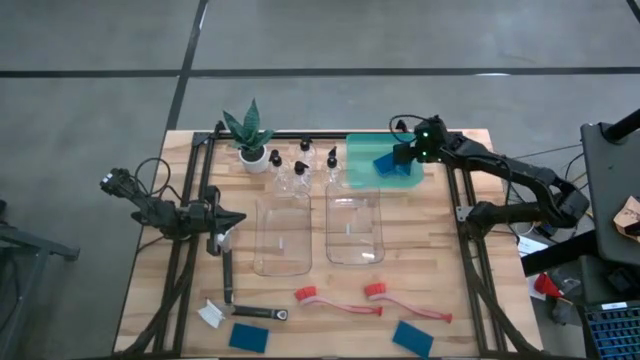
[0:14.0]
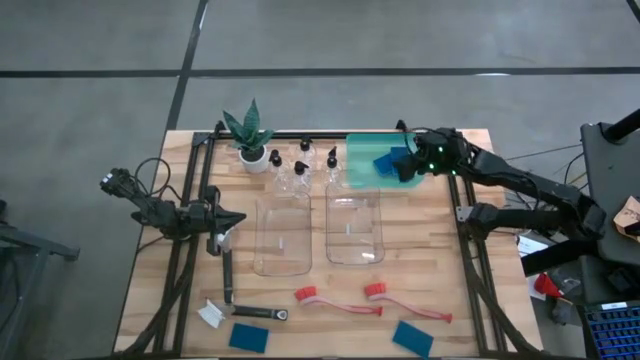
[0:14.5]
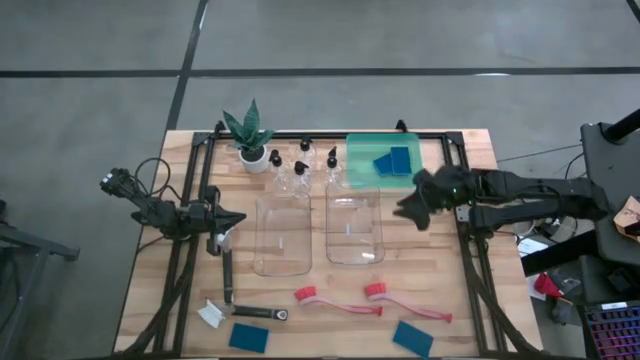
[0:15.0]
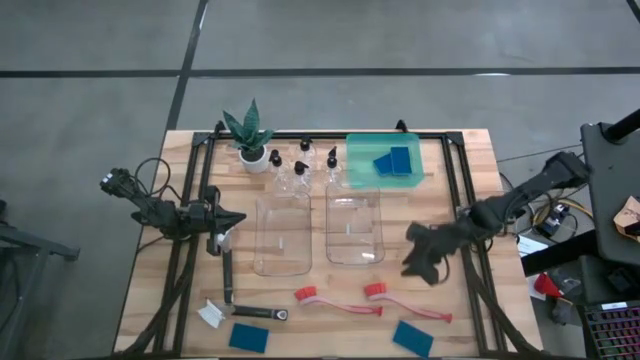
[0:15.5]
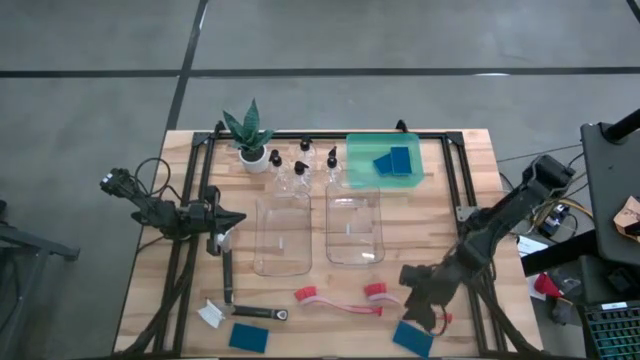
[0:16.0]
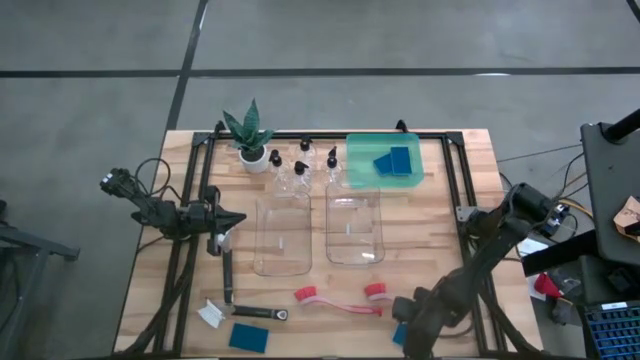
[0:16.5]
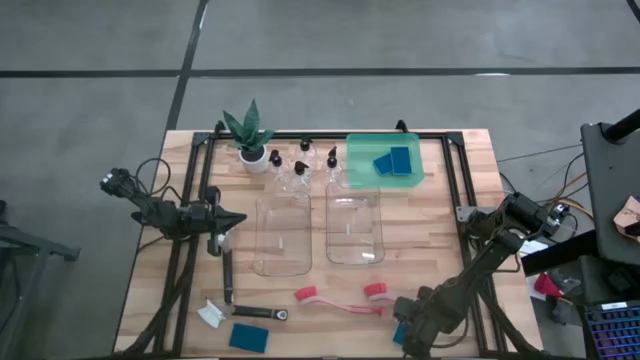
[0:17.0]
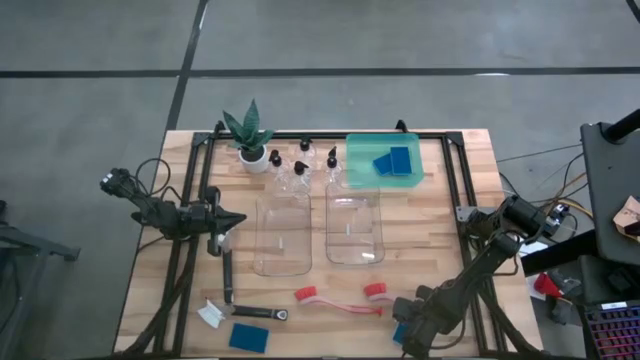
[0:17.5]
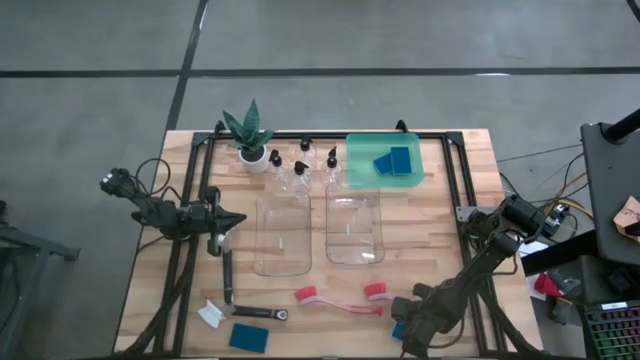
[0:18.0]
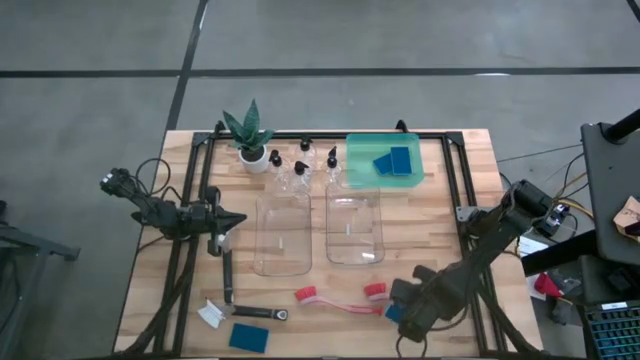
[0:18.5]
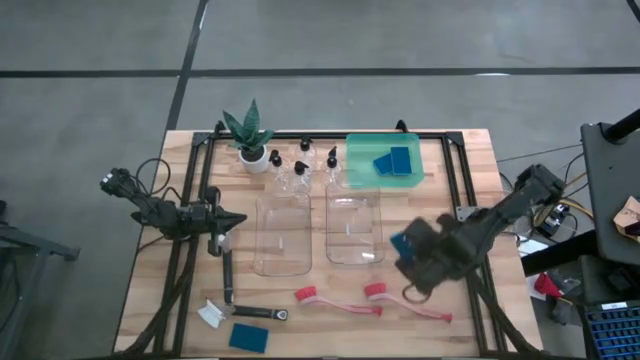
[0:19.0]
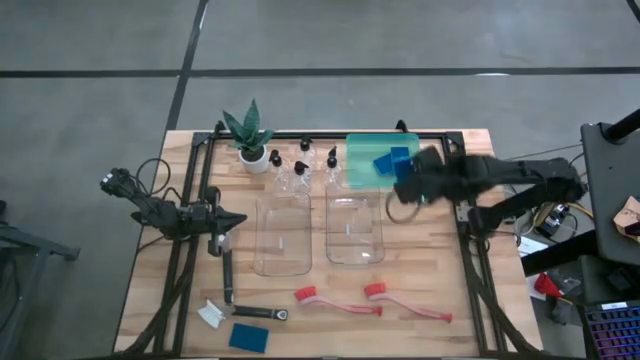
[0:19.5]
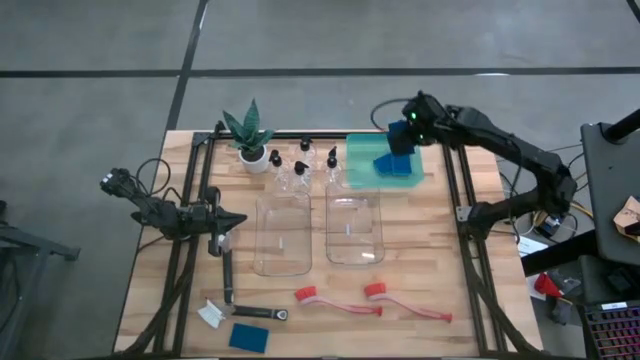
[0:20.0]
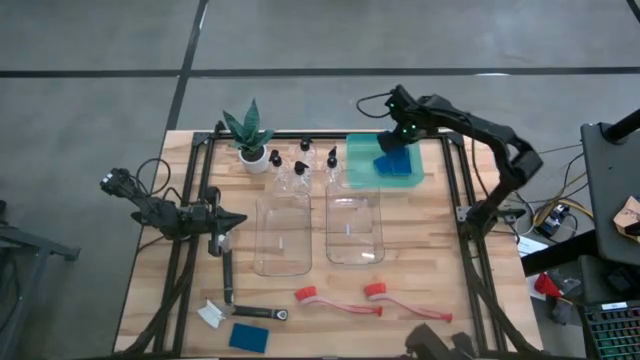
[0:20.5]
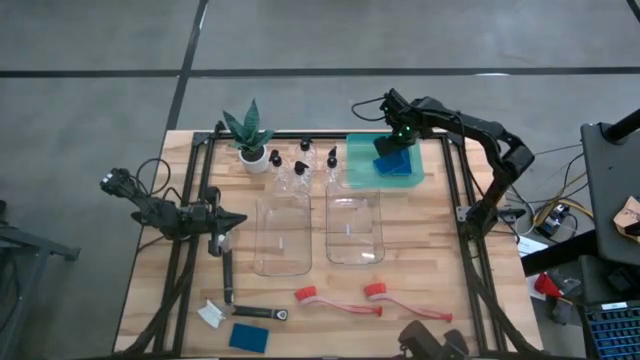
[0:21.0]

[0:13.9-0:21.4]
Task: Pick & Place Kitchen Sink Supplies
Put the blue sponge into the green bin

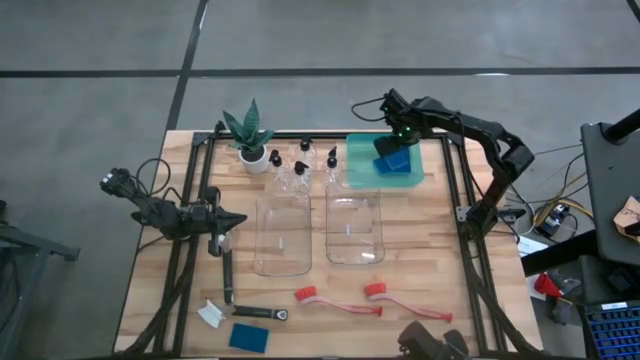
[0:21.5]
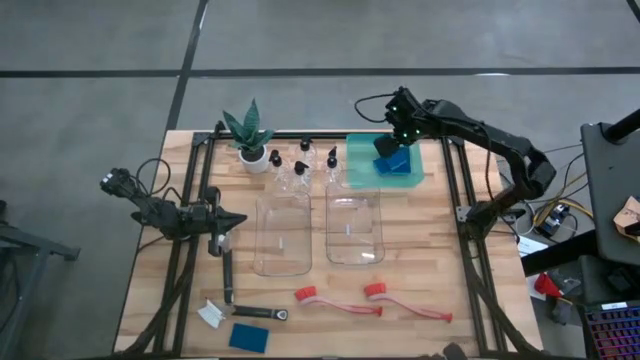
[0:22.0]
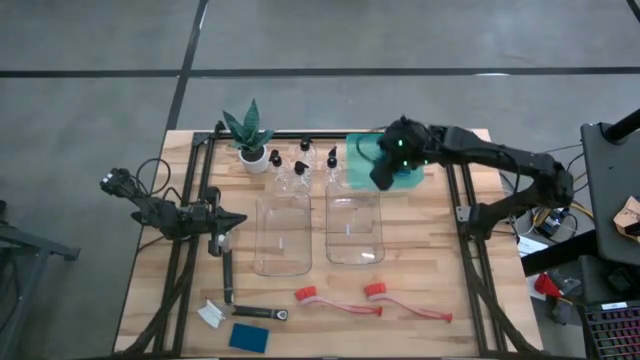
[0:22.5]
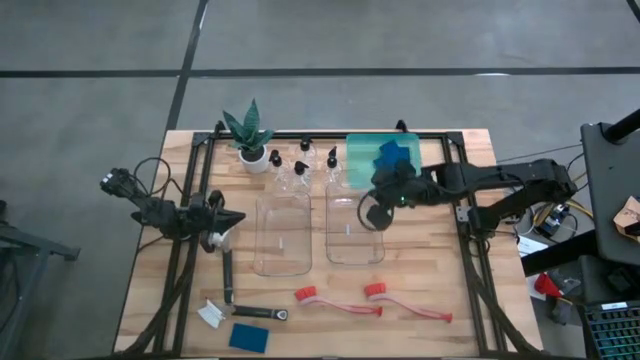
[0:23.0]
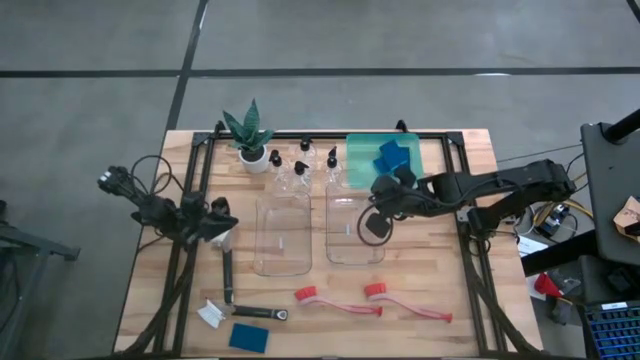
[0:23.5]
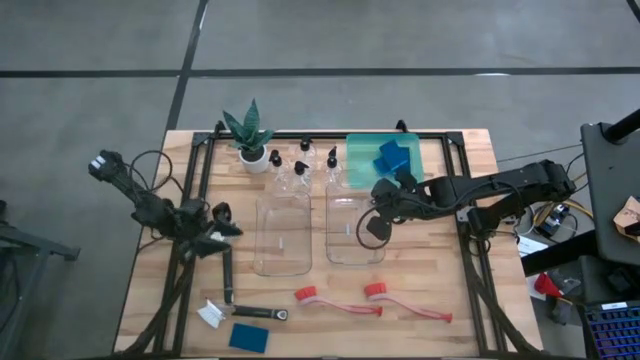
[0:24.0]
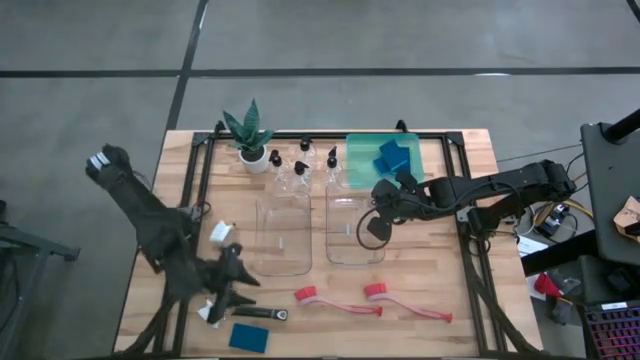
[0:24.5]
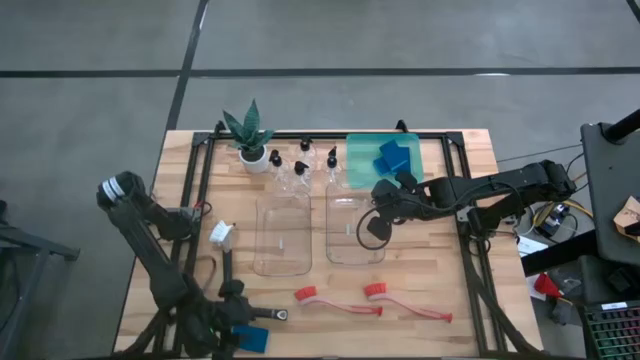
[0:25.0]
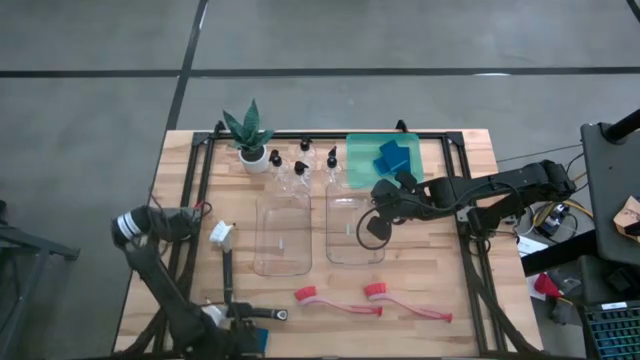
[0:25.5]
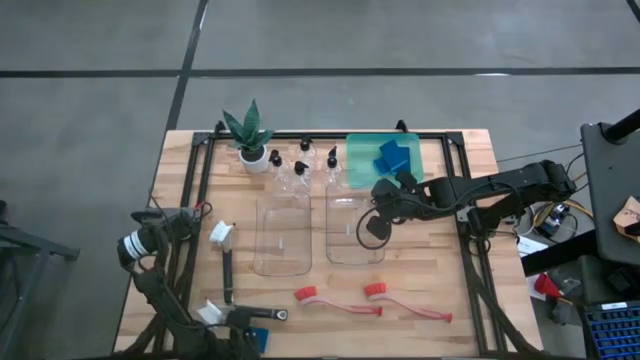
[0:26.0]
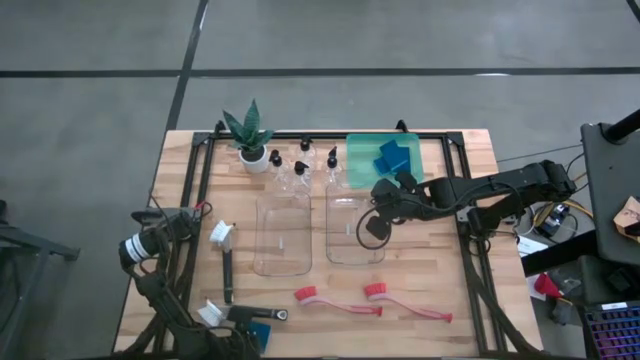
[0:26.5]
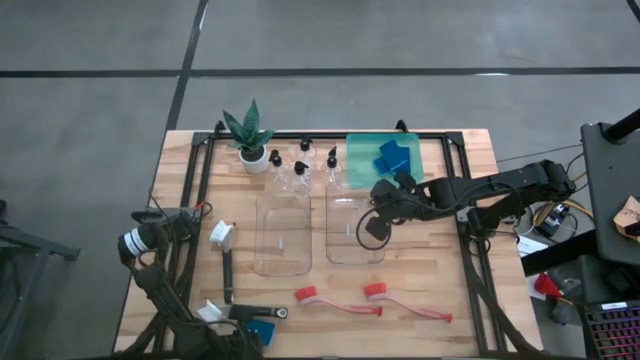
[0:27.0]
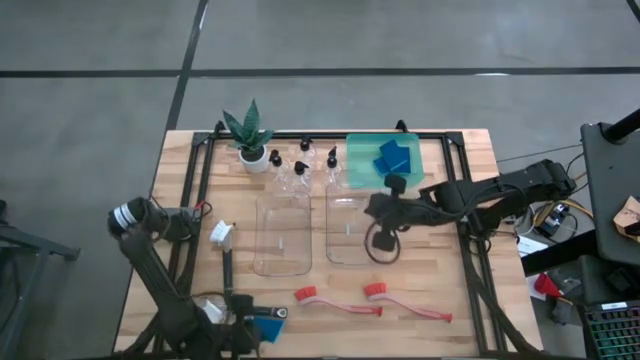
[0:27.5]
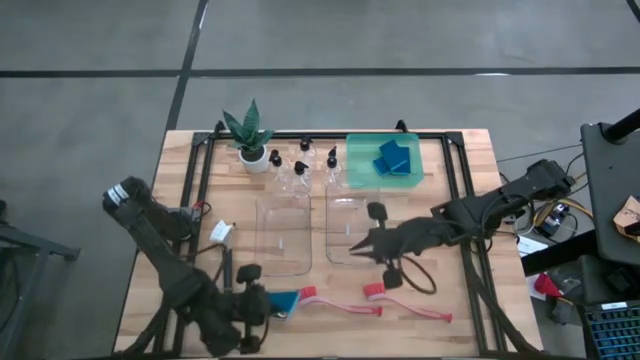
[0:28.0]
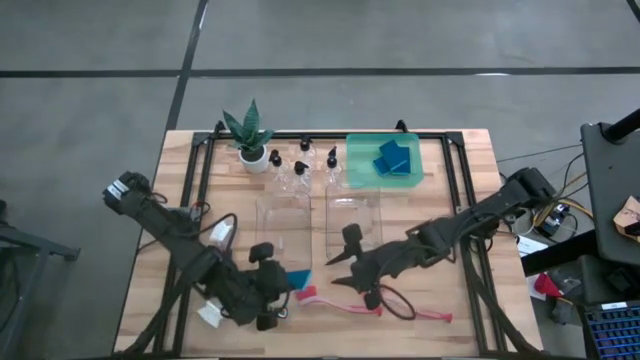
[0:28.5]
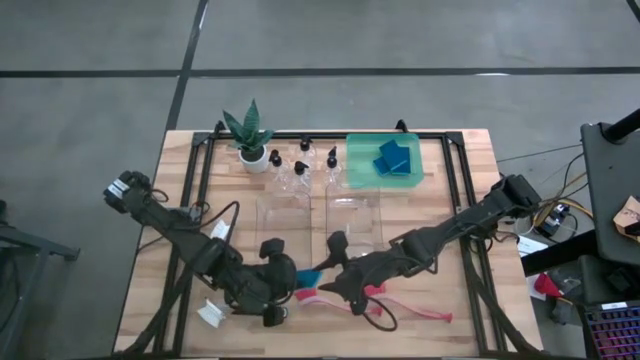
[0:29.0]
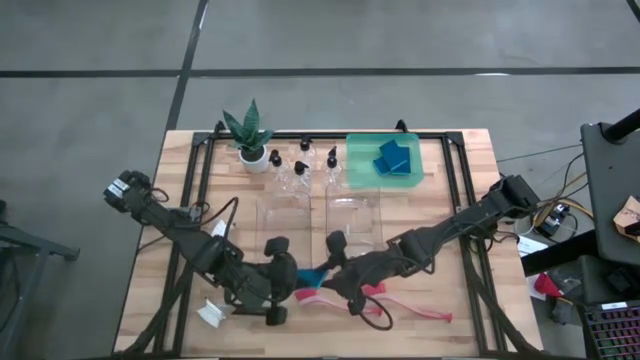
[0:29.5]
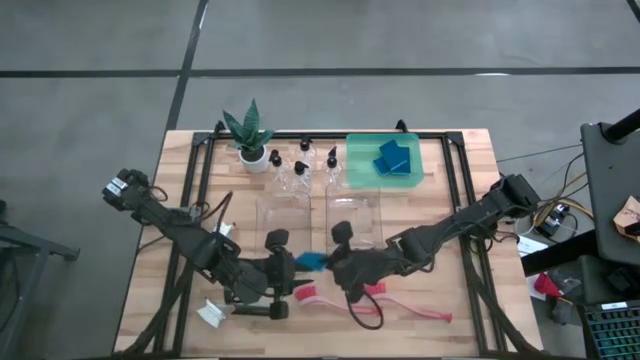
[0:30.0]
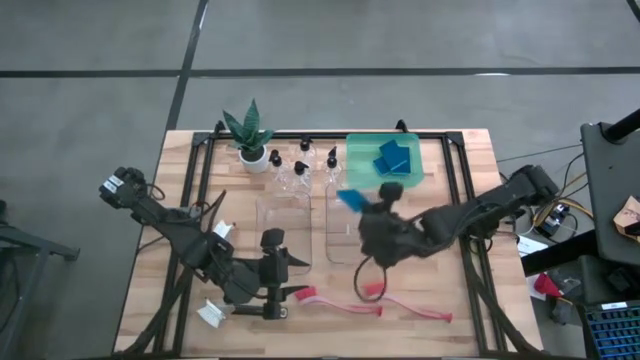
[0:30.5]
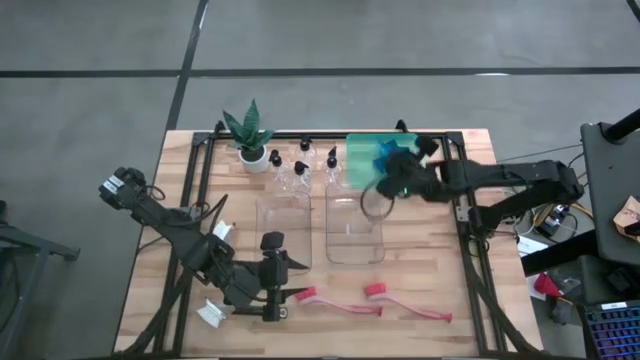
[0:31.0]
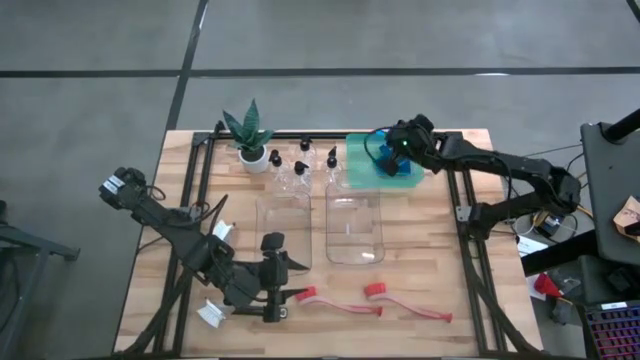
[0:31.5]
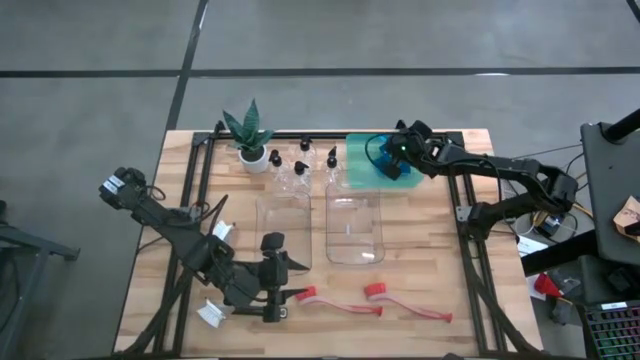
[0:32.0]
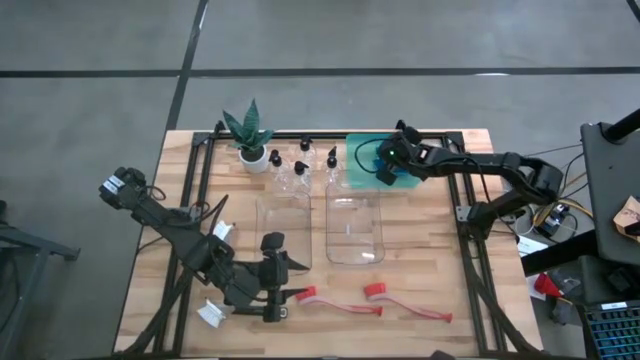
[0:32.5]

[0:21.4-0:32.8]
Put the blue sponge into the green bin

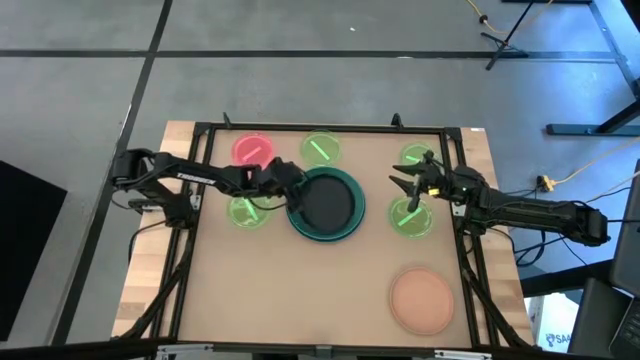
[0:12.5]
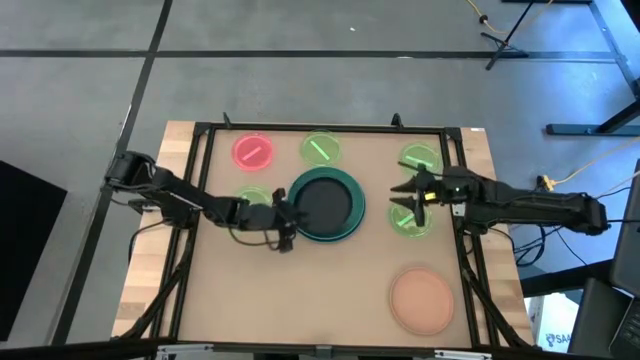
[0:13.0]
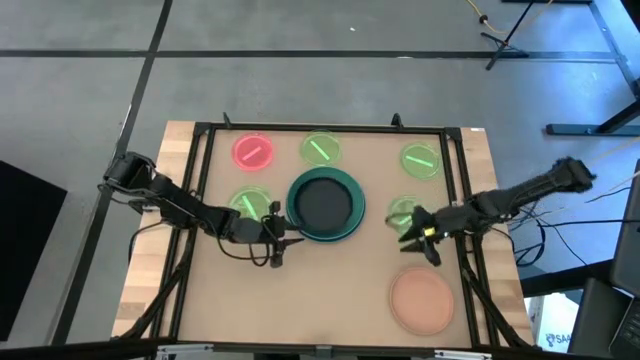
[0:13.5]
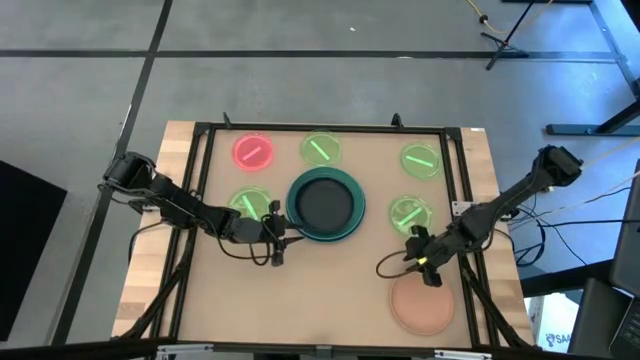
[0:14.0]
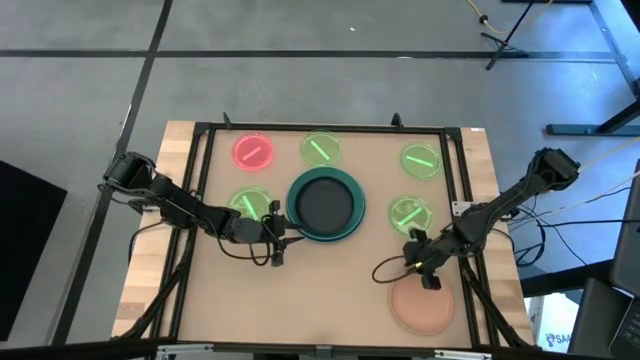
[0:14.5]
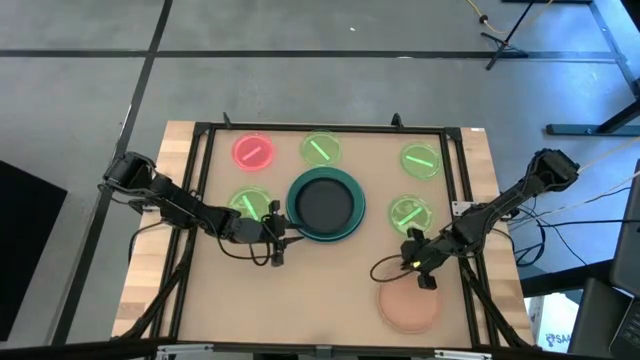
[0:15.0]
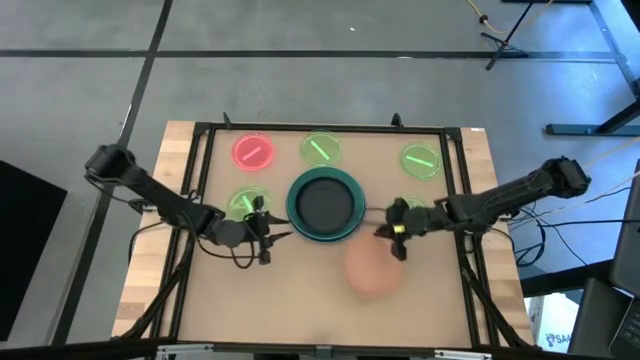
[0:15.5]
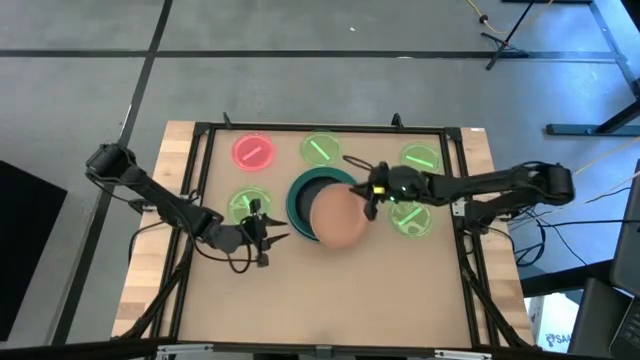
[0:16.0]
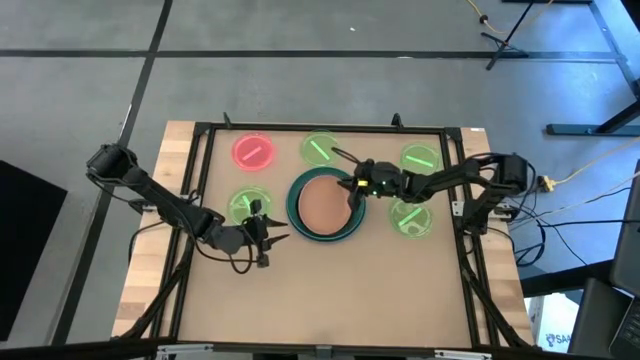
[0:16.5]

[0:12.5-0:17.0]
Task: Stack plastic plates
Stack the orange plate on top of the black plate
